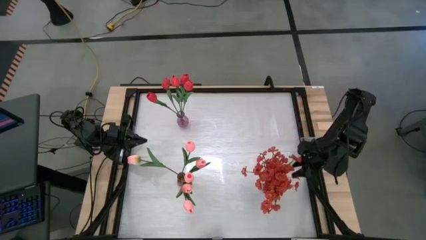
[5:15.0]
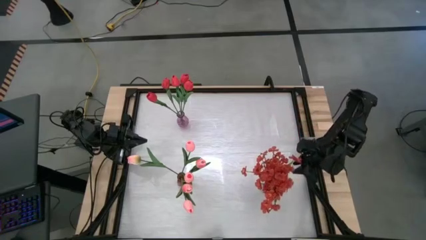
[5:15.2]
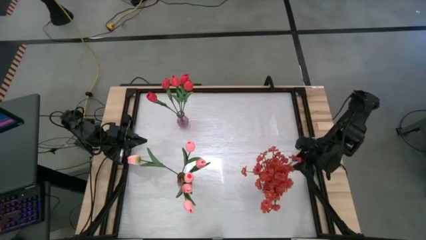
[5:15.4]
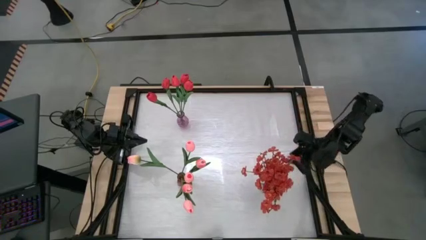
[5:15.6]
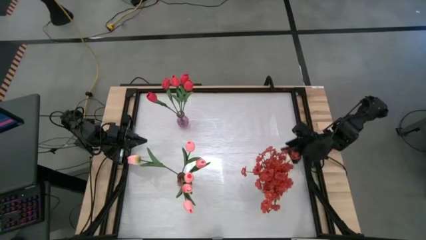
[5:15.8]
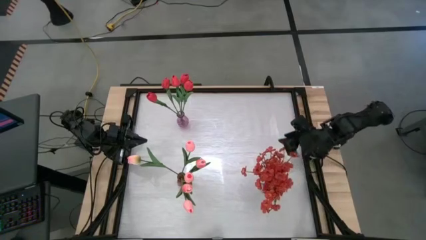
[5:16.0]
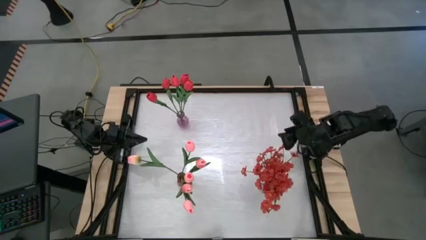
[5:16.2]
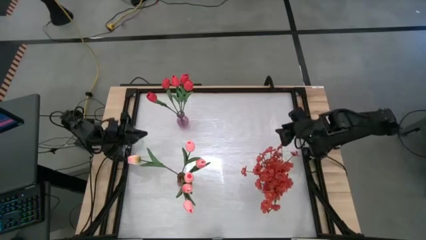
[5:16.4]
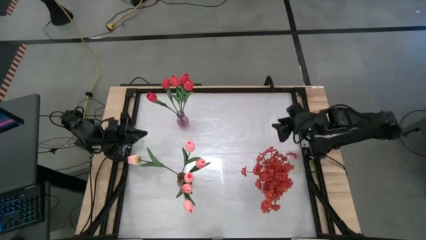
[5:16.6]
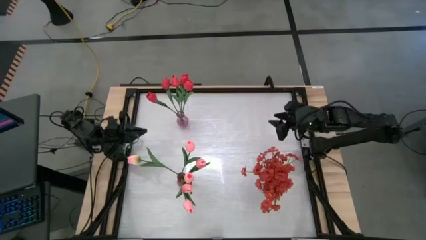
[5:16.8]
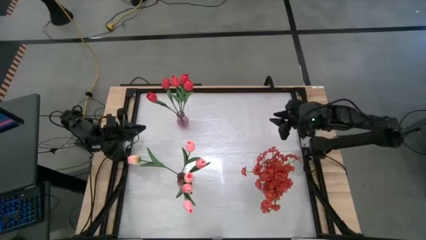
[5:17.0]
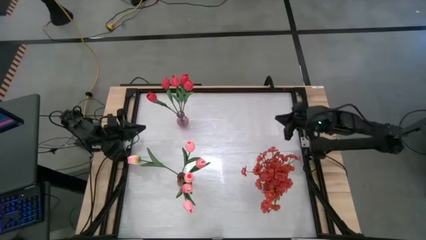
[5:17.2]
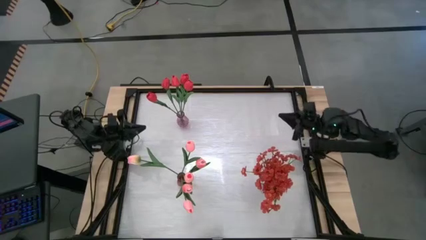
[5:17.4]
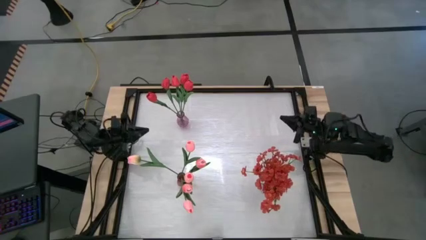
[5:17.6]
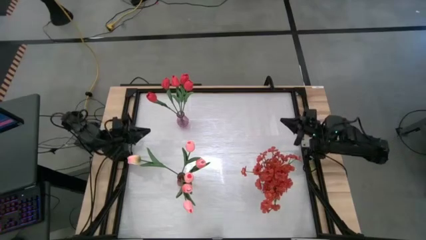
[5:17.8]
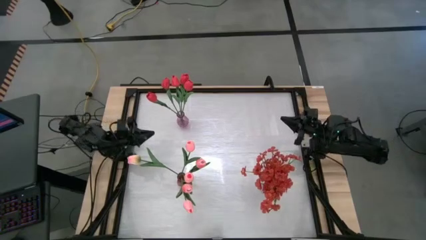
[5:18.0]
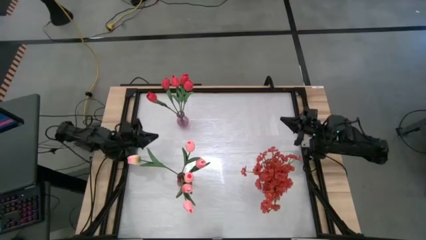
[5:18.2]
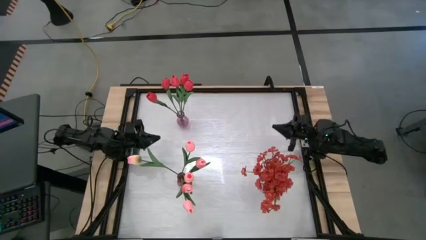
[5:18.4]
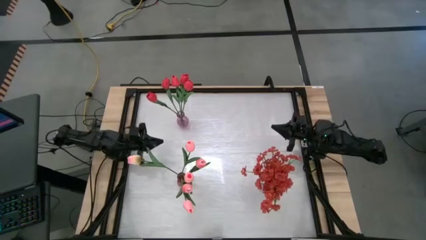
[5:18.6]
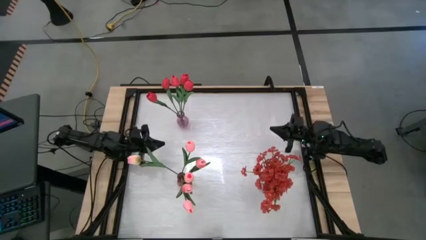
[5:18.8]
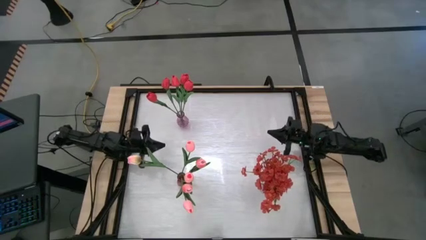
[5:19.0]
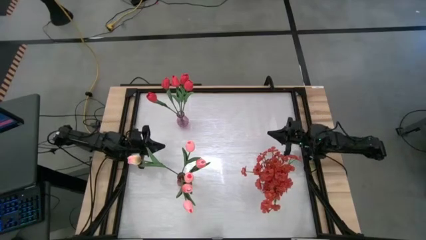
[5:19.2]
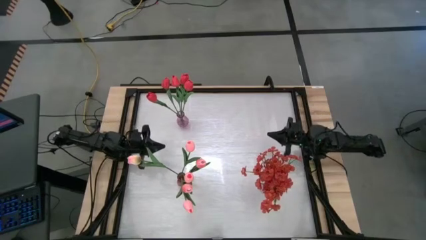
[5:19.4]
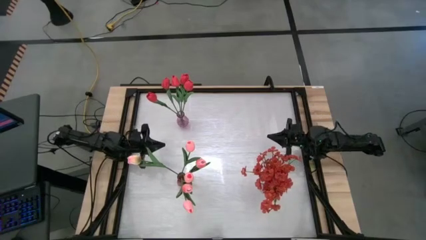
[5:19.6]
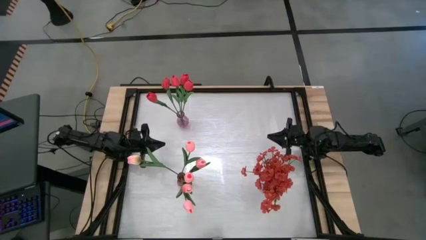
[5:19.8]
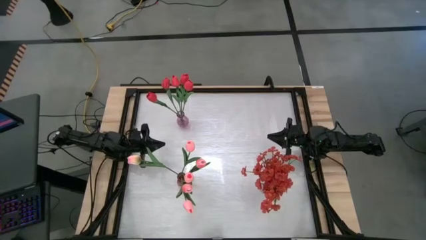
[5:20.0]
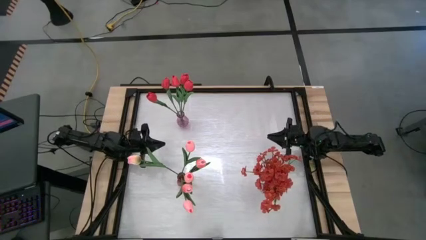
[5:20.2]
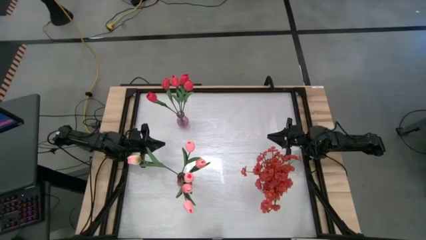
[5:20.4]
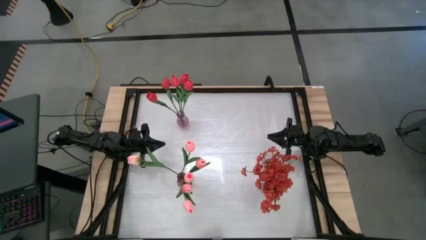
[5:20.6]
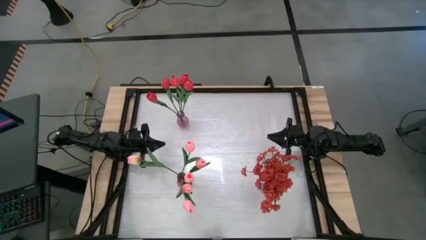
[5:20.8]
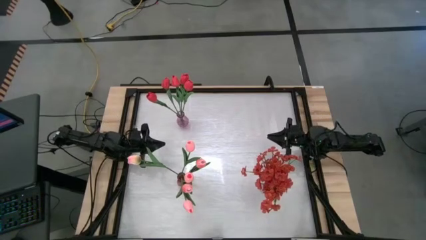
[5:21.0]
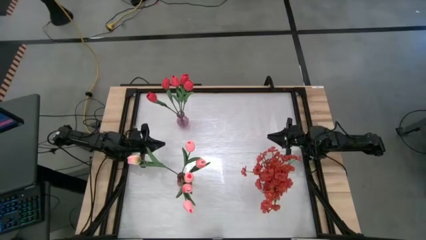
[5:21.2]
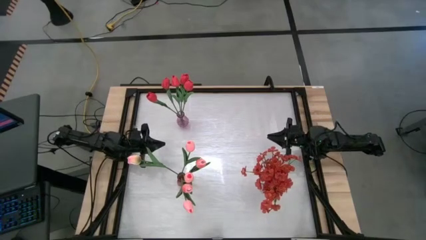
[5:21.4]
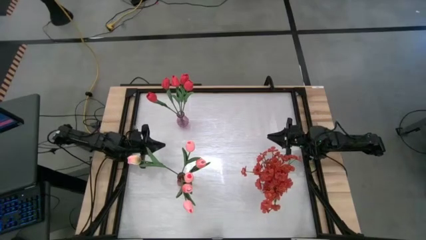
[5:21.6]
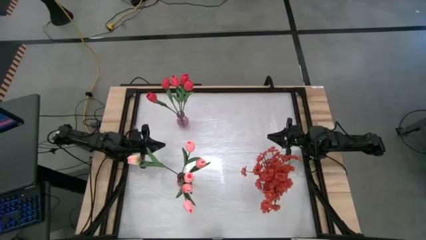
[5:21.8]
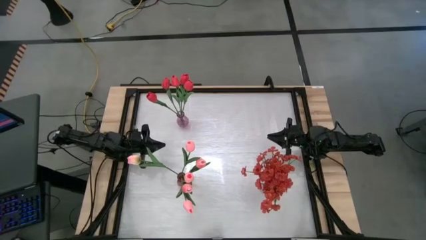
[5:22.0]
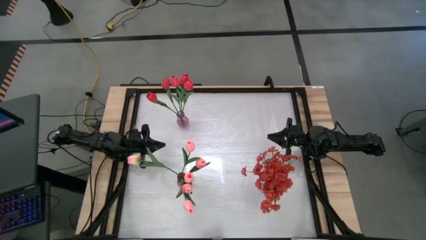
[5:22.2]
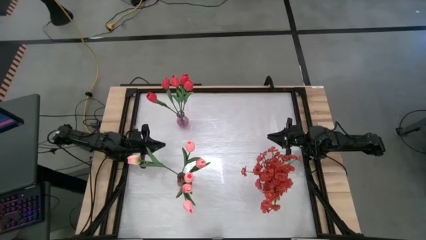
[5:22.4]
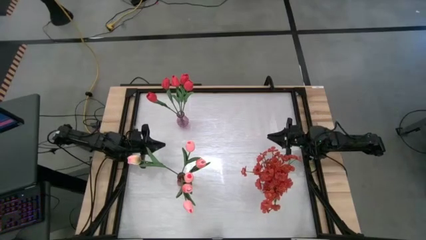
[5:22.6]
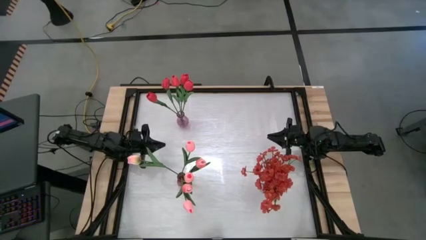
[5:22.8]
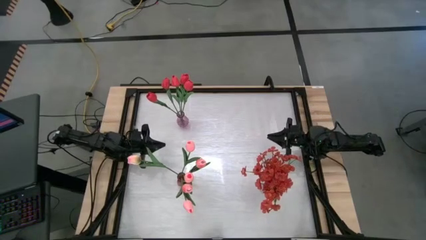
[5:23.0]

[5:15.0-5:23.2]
Task: Sort flowers into vase by color
Return to Home Position

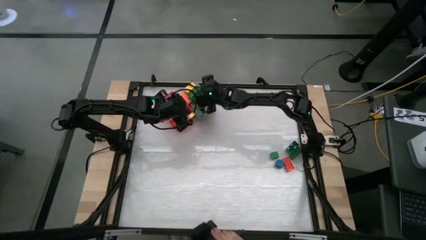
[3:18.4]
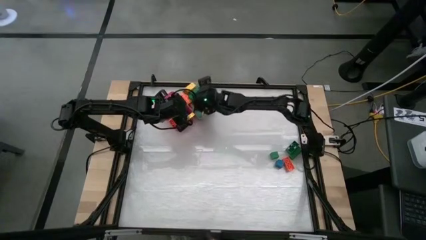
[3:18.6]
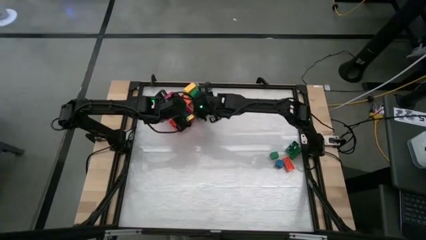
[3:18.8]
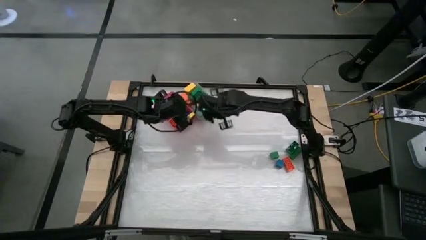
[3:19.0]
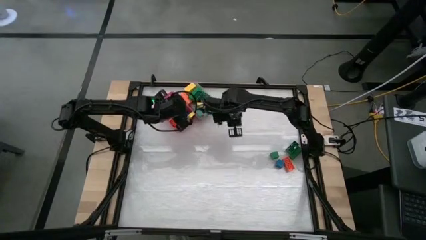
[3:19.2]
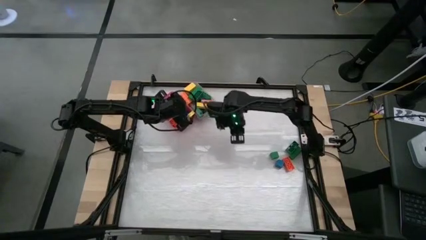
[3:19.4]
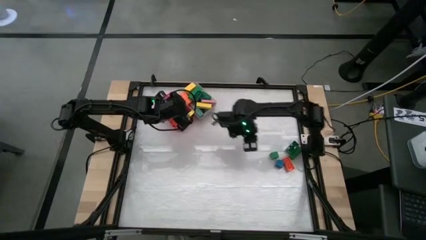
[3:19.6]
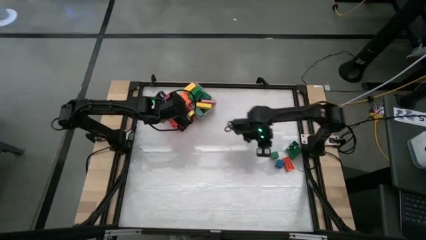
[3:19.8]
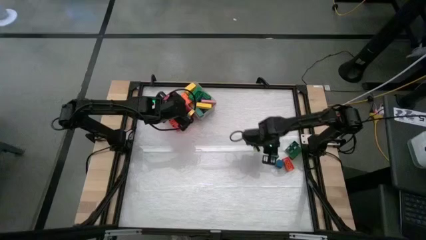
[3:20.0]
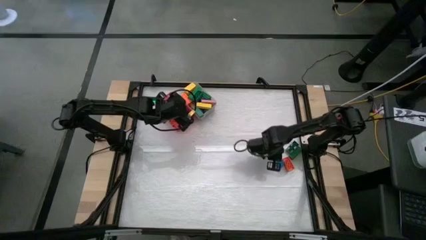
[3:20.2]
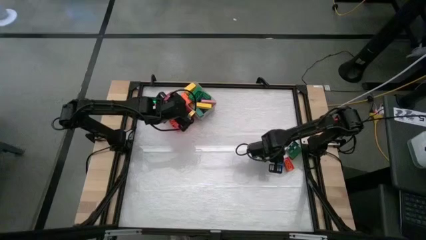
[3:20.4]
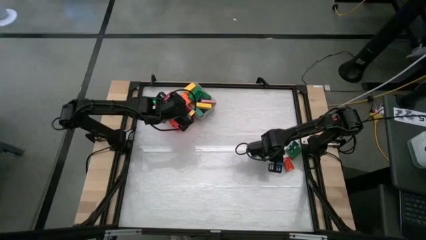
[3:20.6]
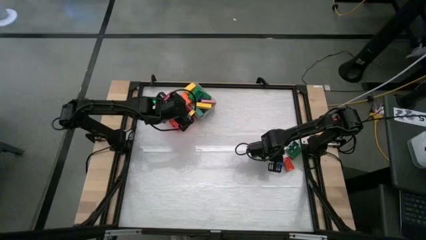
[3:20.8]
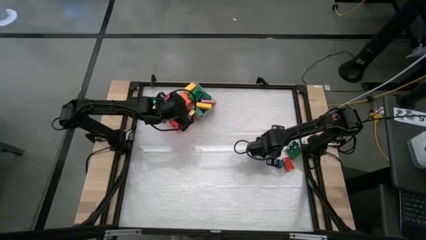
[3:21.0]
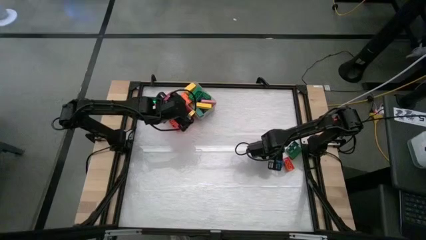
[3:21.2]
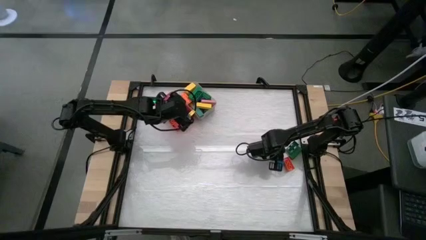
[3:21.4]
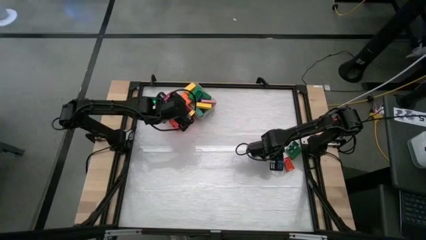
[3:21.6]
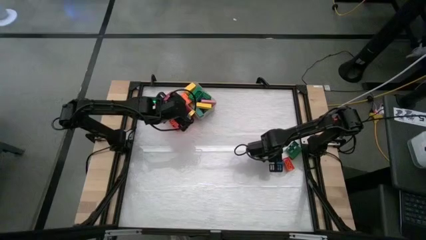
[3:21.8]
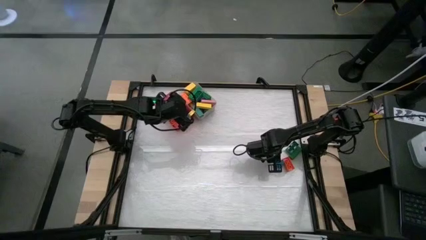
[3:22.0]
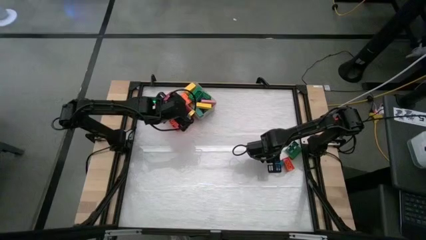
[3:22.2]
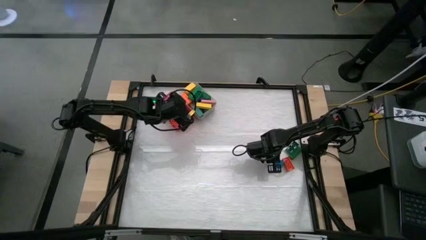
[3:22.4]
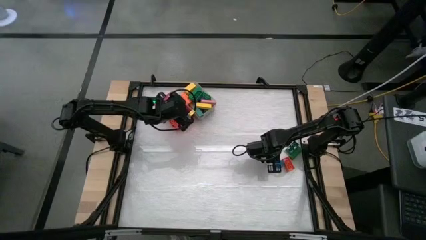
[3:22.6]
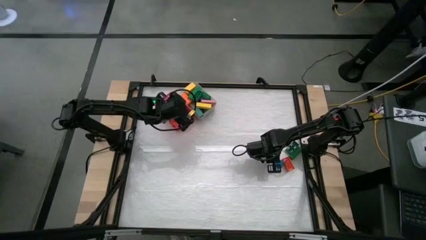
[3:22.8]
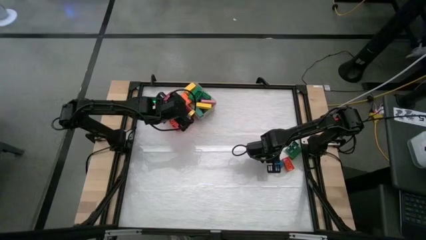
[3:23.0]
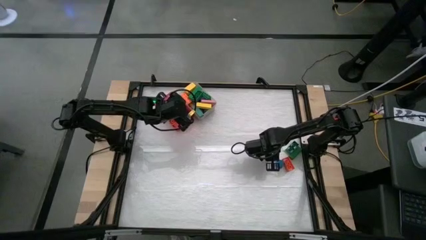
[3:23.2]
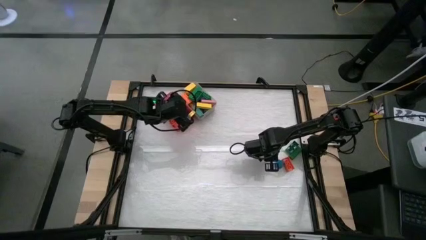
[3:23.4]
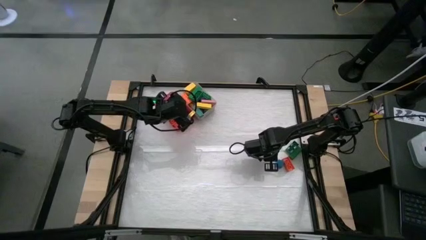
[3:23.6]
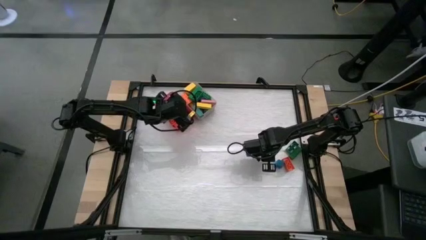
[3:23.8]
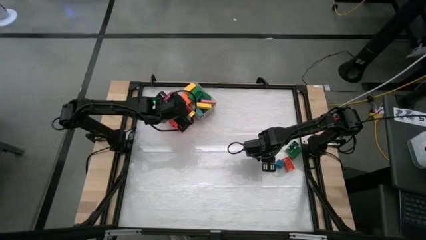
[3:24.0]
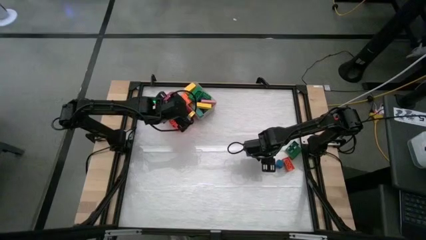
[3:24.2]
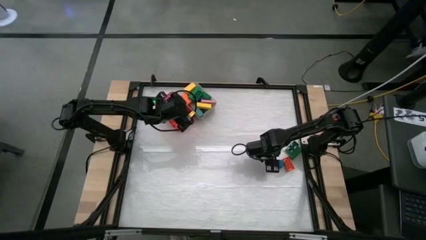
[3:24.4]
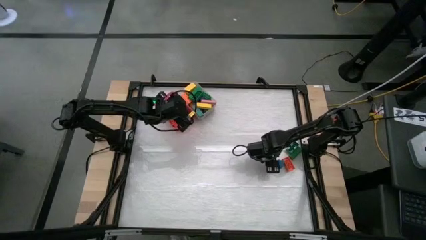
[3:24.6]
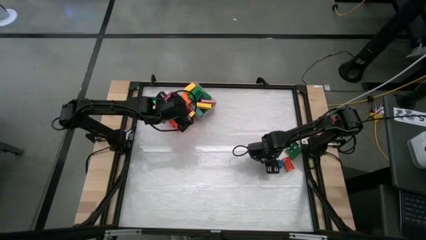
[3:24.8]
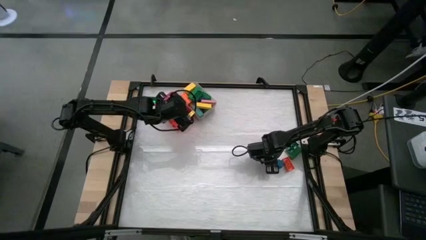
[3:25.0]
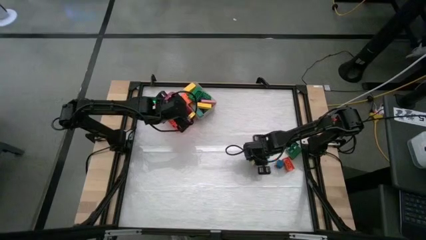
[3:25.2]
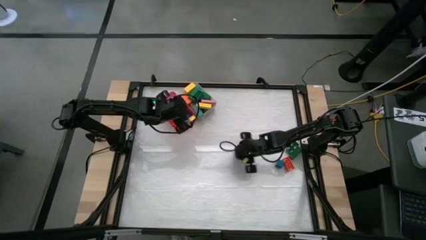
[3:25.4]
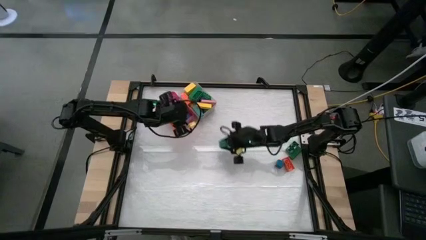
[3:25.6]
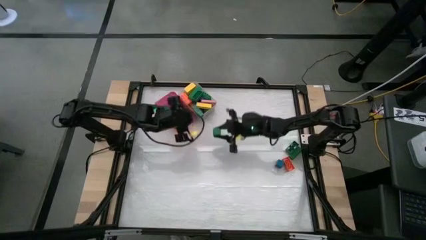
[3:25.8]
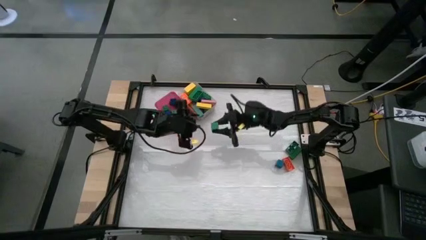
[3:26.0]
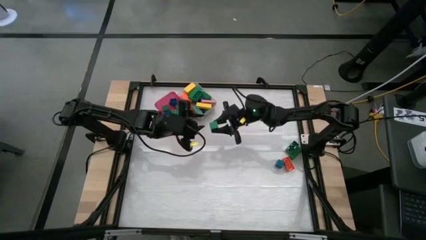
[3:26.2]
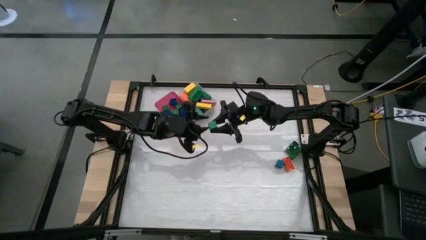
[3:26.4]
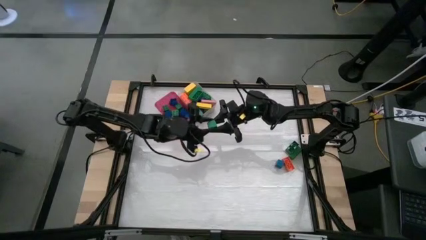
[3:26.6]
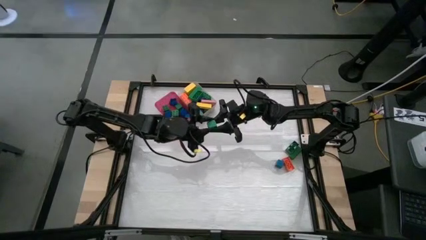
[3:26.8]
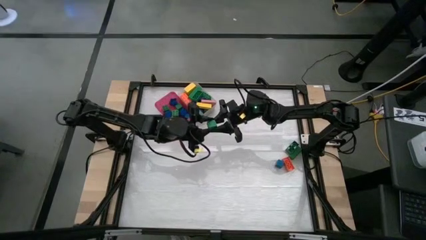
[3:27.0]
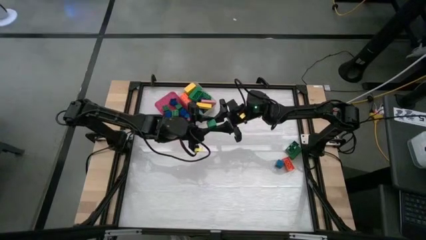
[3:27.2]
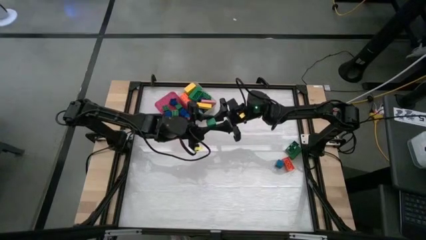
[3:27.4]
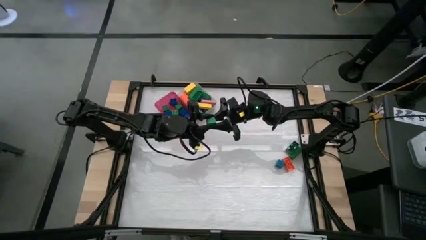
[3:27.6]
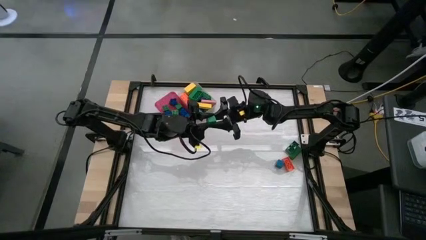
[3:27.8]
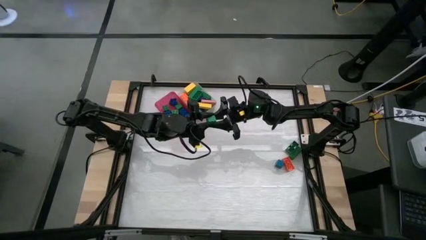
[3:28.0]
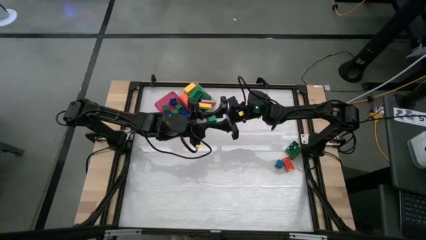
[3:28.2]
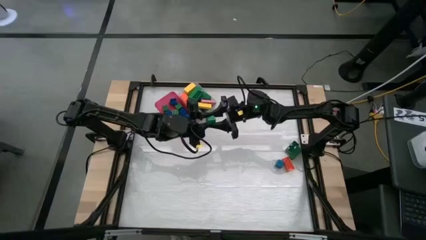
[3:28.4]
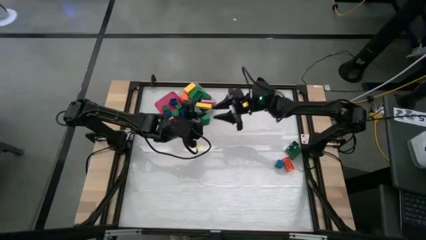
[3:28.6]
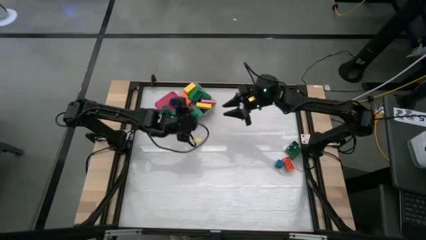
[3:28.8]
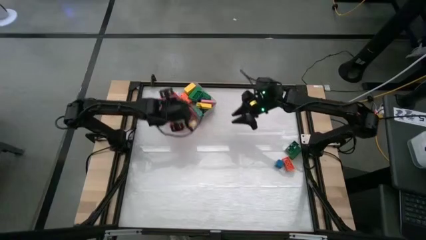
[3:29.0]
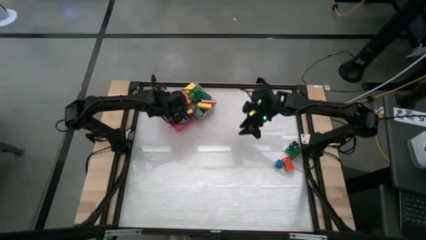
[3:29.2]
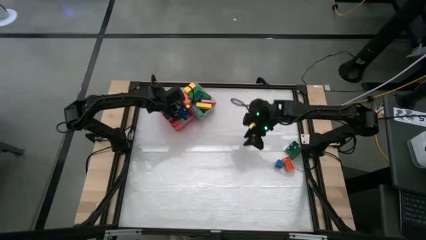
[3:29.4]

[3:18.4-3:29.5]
Task: Sort blocks by size
Put the small green block into the pink bin
